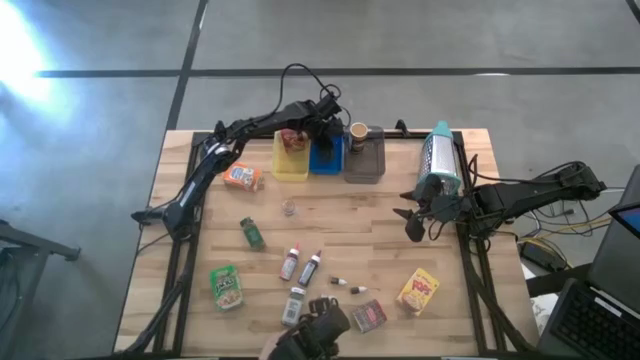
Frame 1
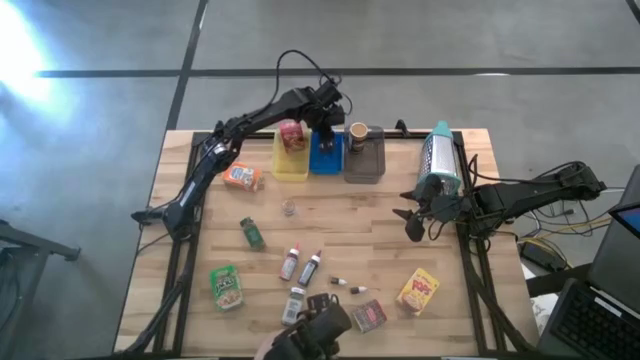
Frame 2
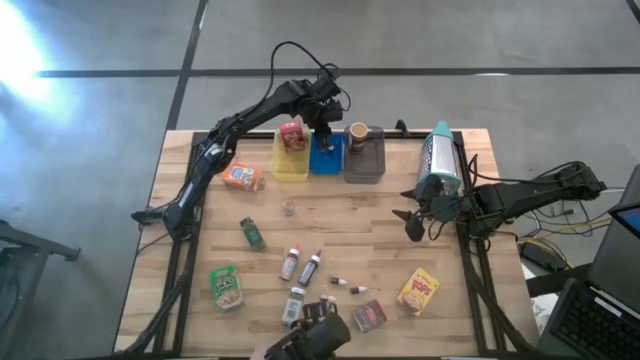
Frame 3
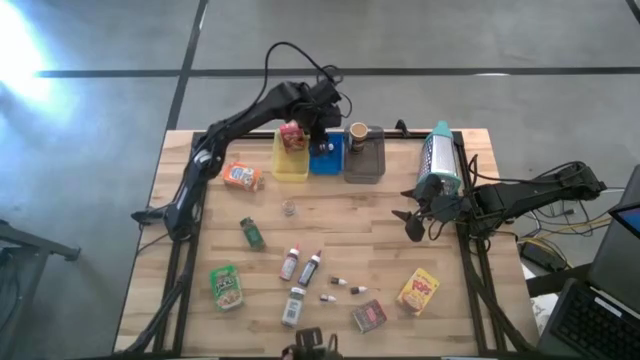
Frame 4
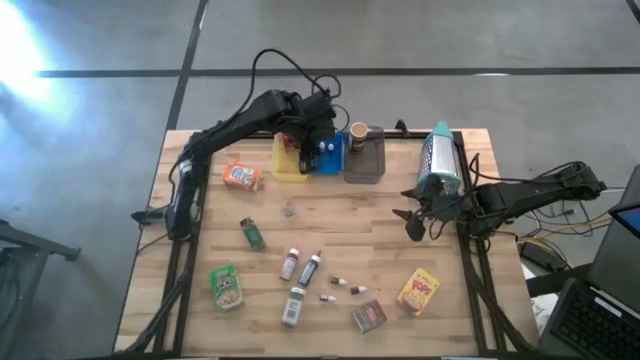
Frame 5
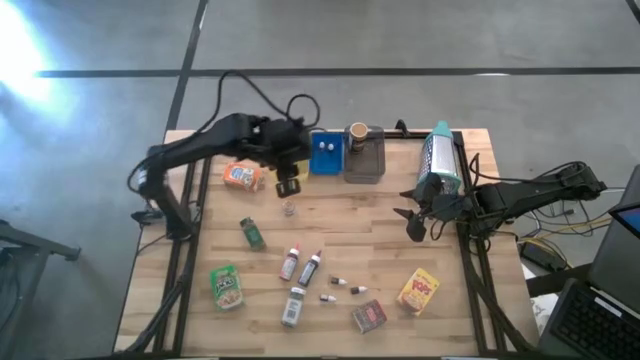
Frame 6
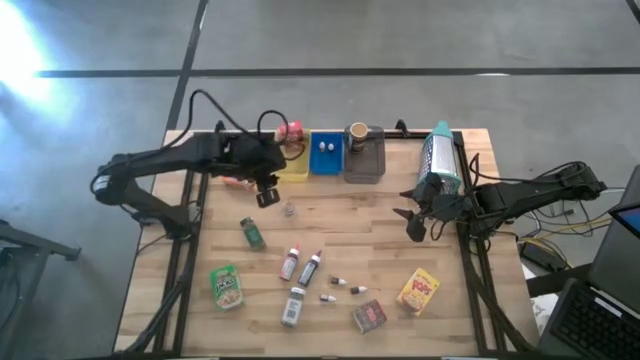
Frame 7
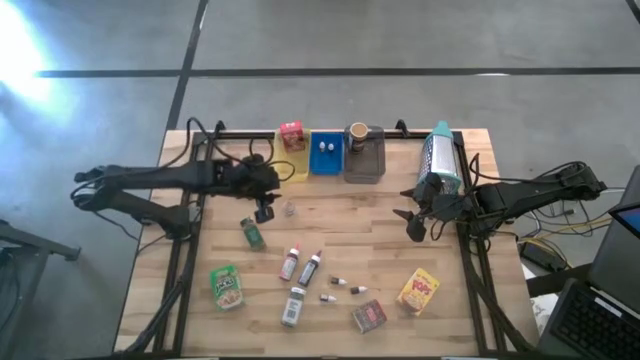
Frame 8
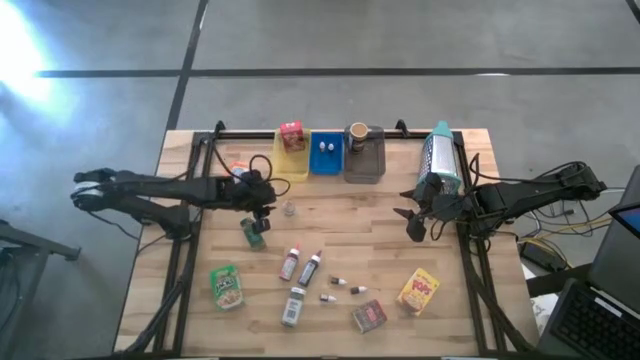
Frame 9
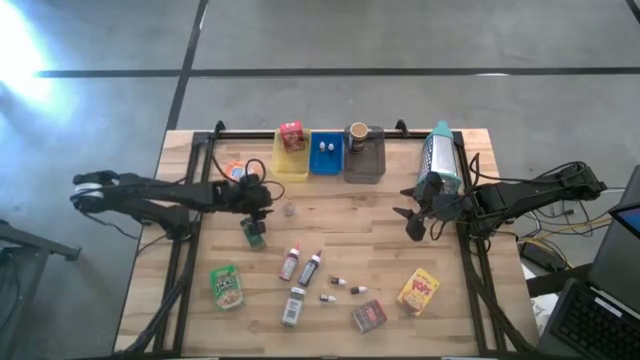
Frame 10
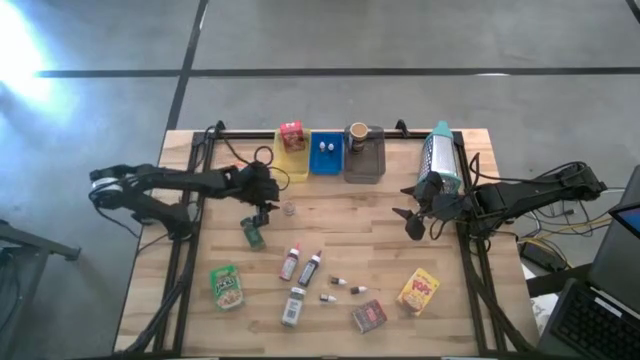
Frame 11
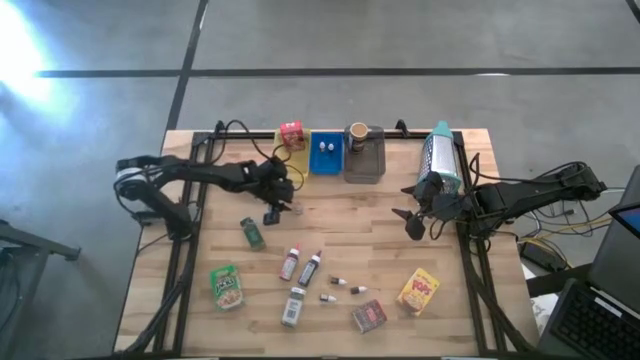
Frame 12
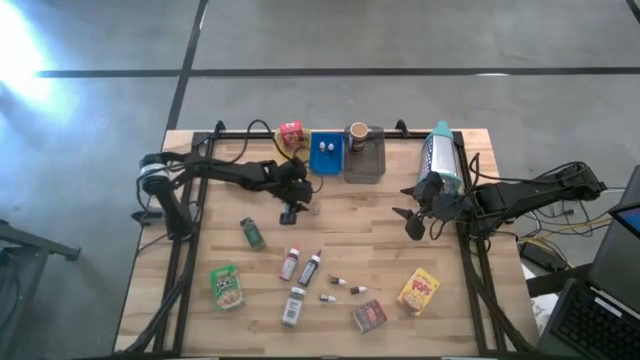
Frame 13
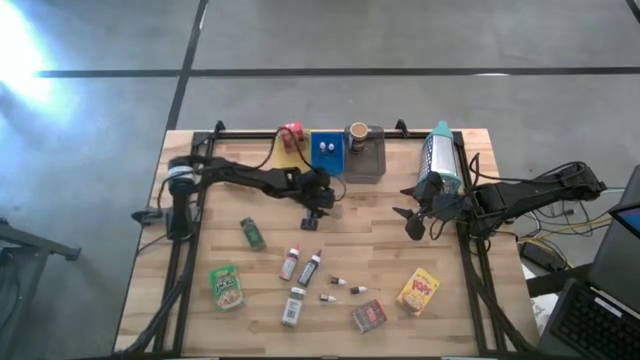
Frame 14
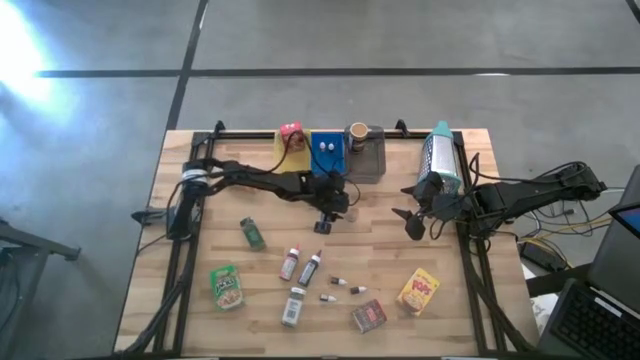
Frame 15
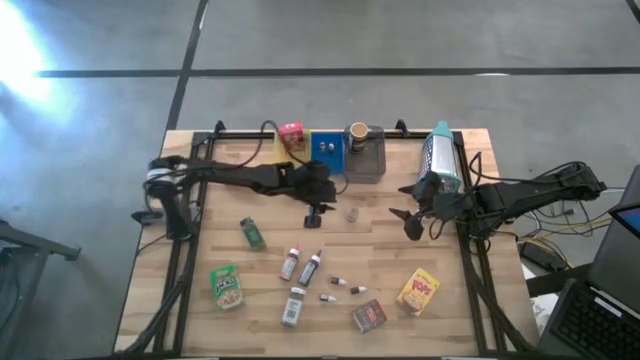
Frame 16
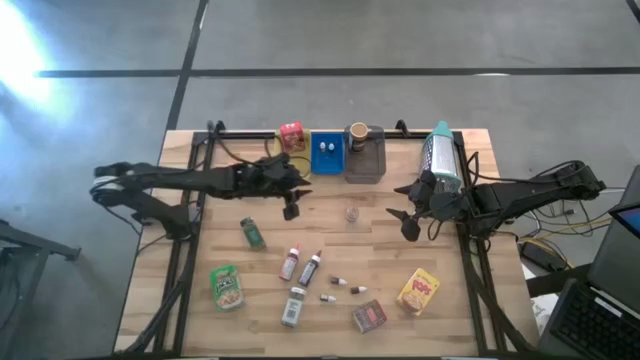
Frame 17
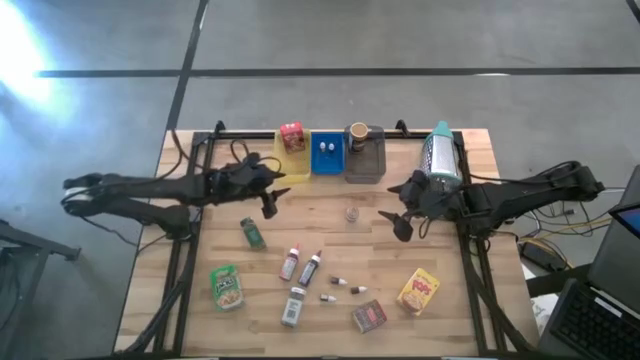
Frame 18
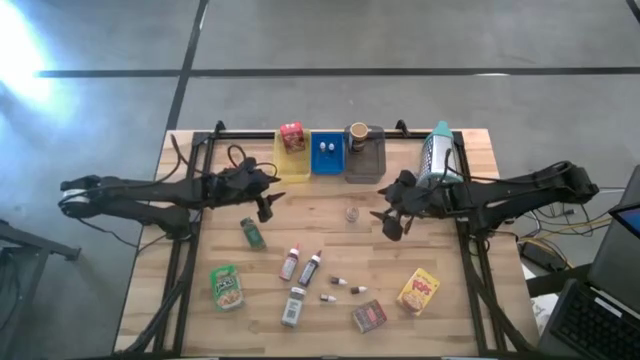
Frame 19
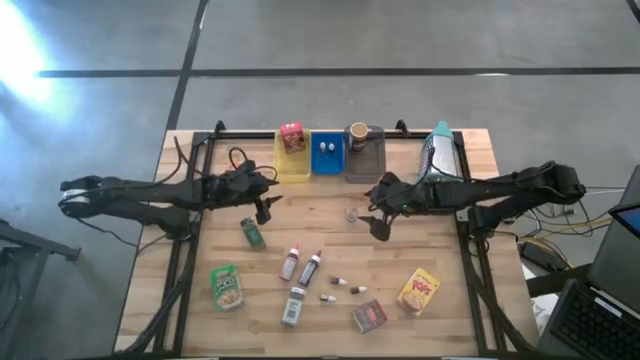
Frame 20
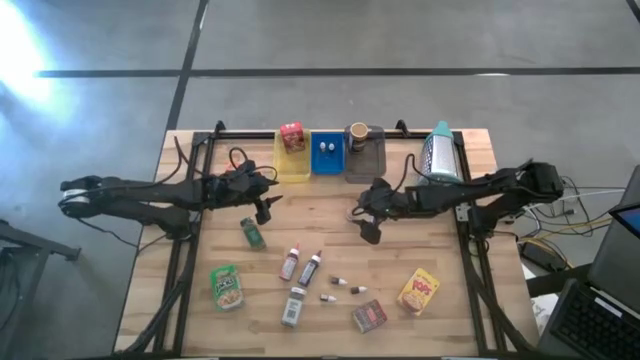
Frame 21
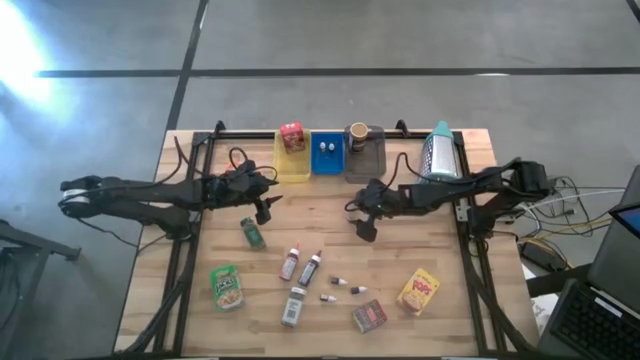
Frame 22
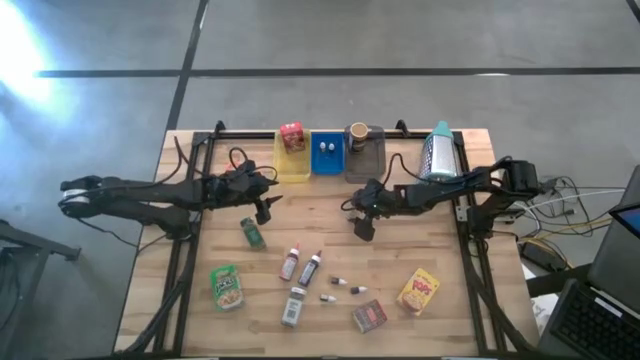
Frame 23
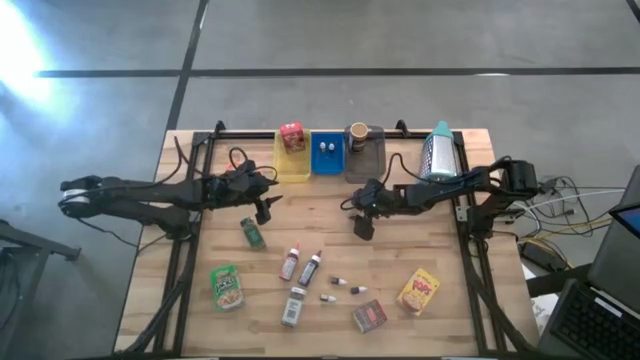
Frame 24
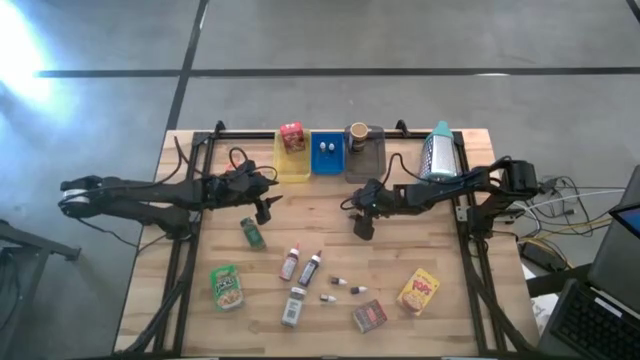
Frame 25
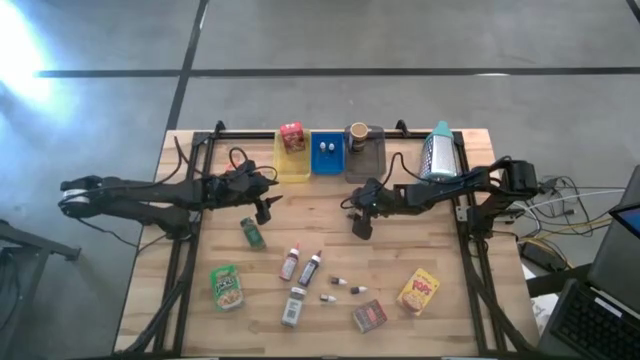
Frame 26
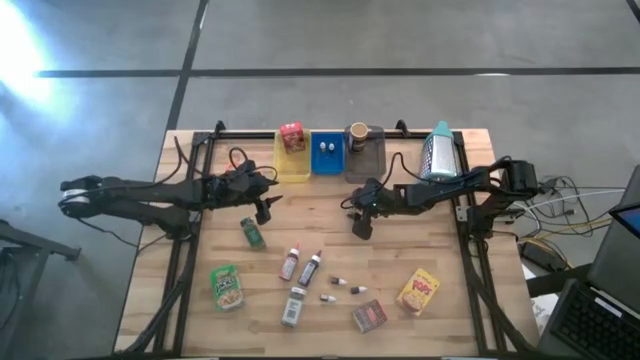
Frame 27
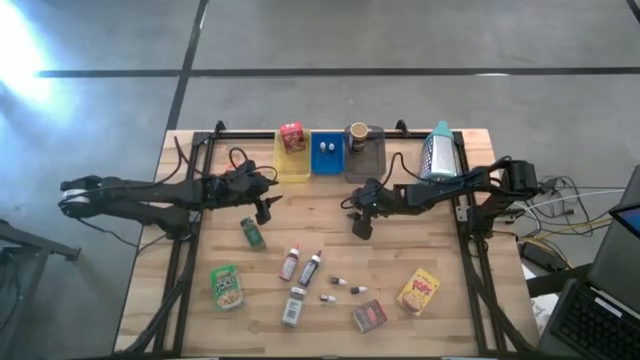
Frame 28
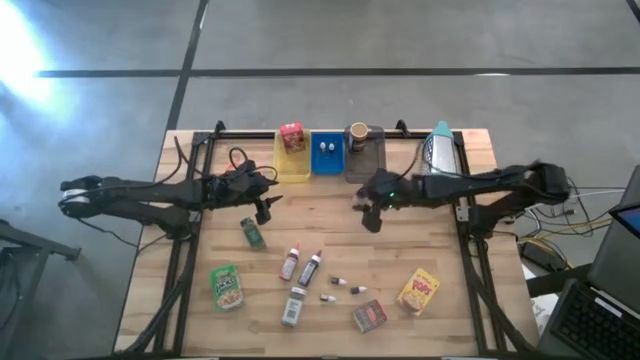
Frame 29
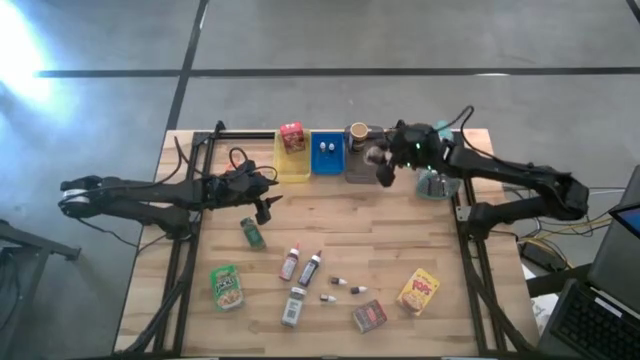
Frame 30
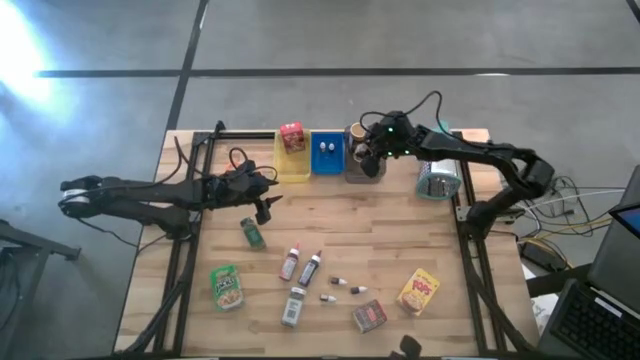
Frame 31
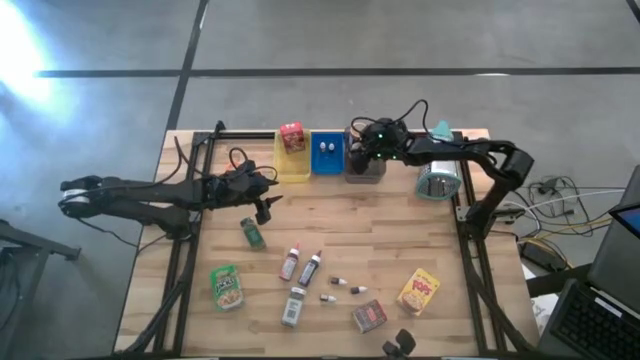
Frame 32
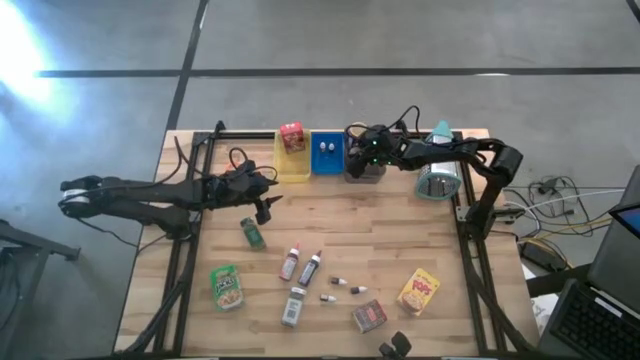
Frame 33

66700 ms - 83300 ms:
Task: Pick & Place Kitchen Items
Put the brown seasoning bottle into the black bin

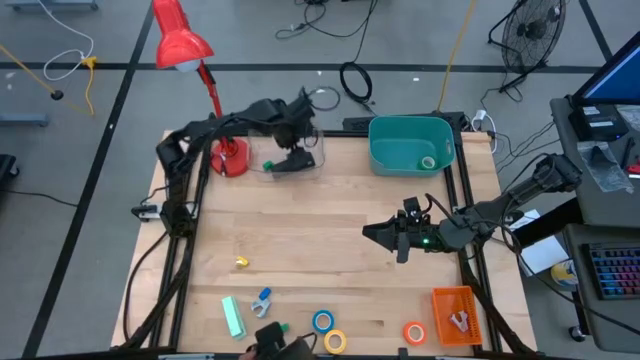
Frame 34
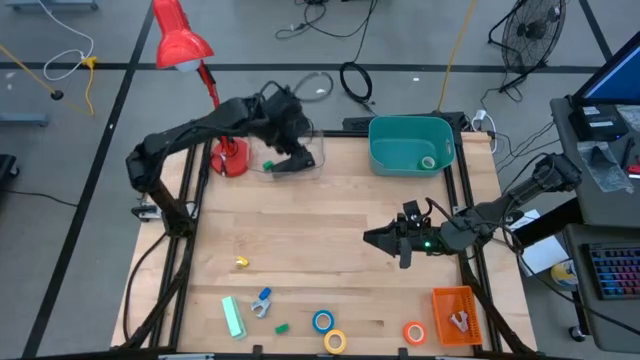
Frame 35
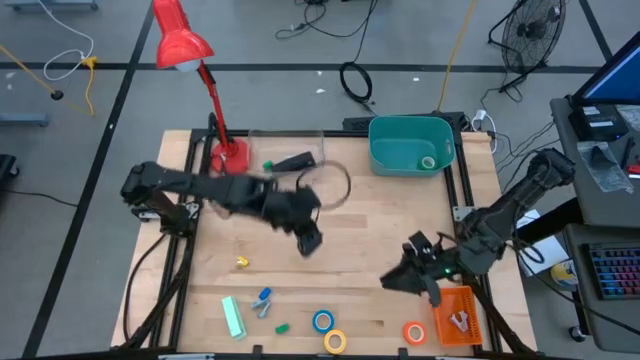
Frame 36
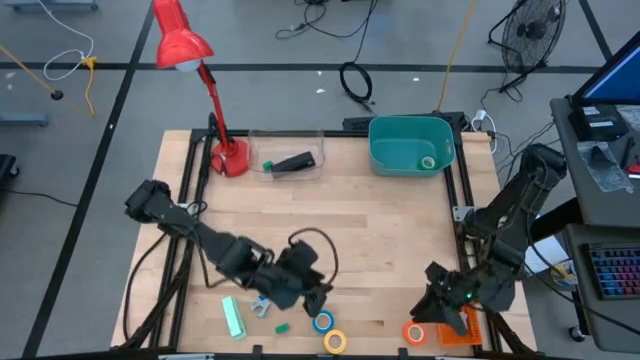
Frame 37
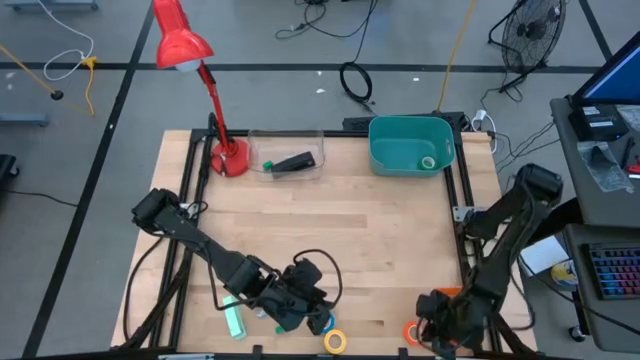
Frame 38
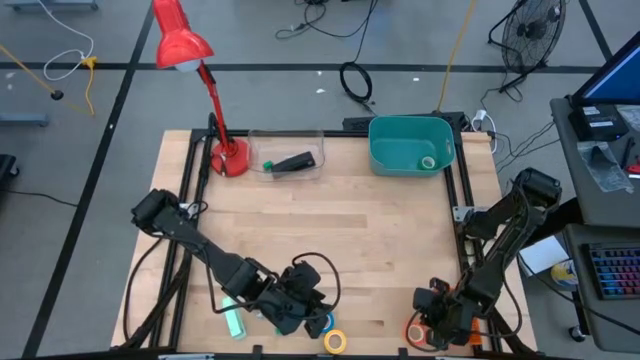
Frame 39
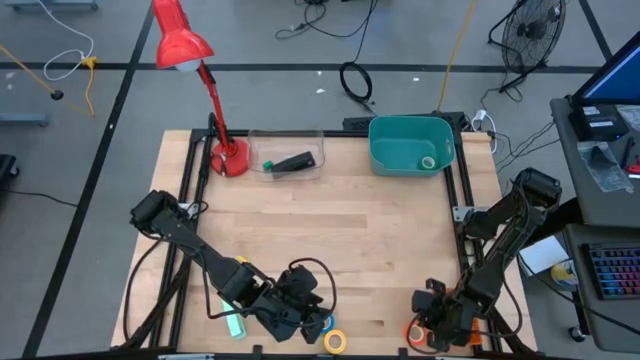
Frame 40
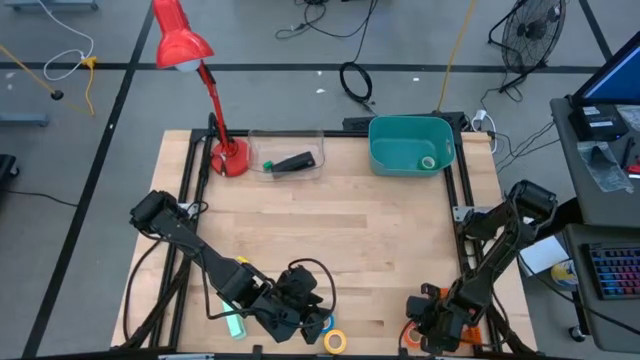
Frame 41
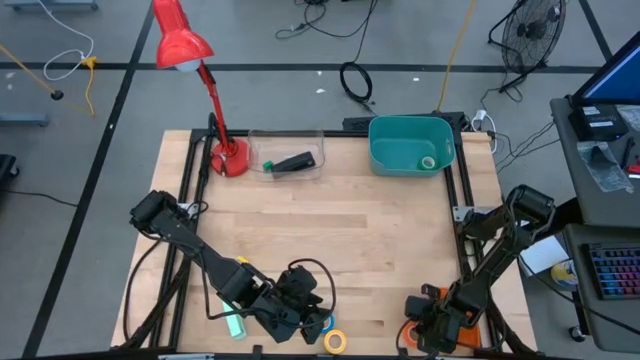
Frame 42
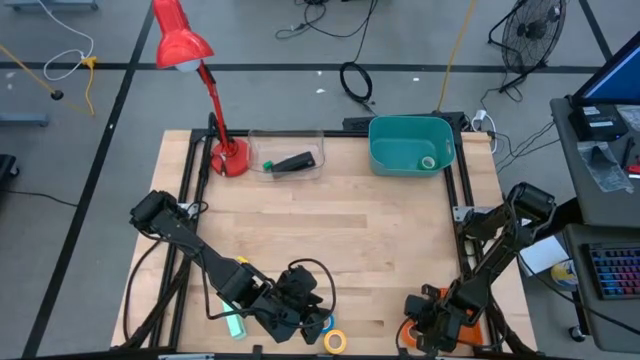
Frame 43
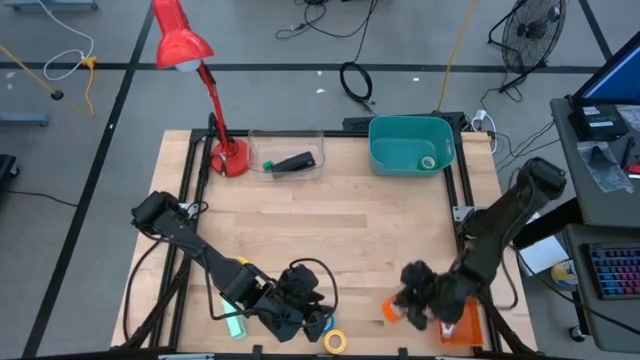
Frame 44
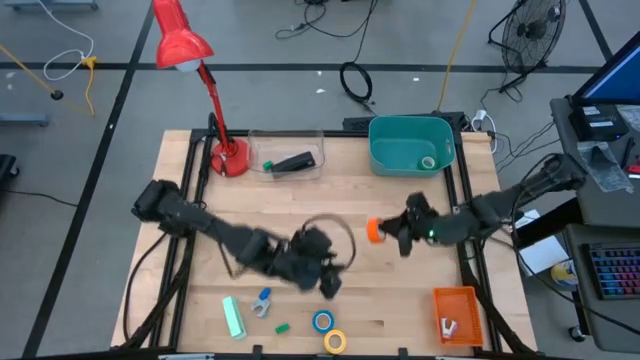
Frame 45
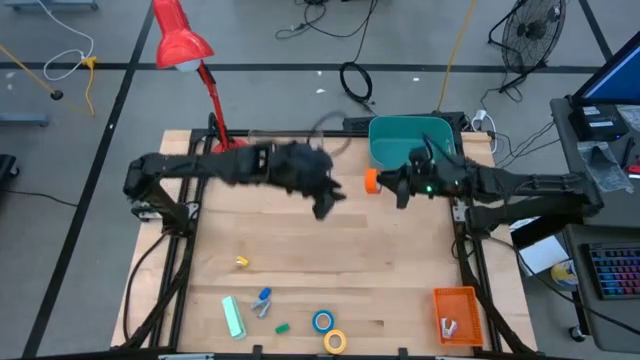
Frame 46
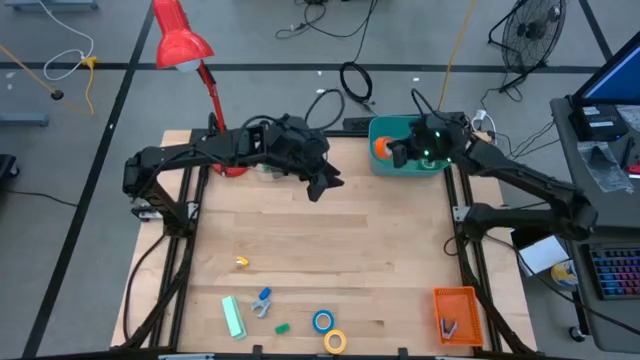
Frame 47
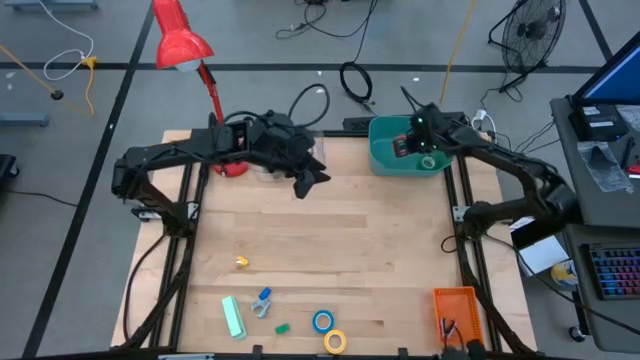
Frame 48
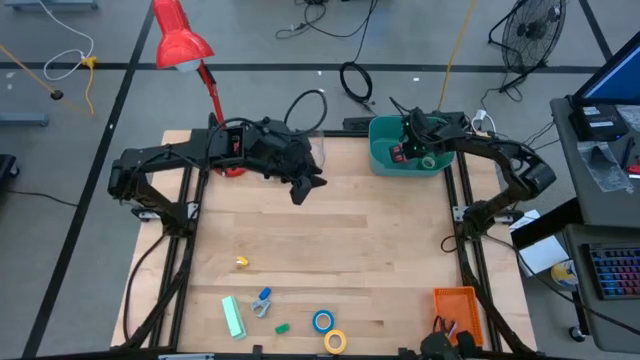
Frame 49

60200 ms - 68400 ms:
Task: Pick and place Stapler, Stapler remover, tape
Put the orange tape into the blue bin
